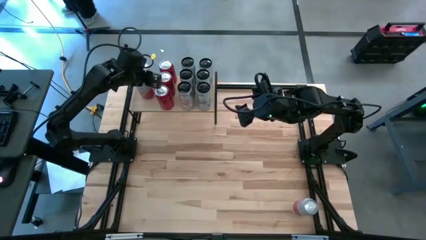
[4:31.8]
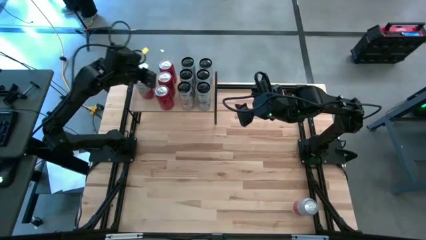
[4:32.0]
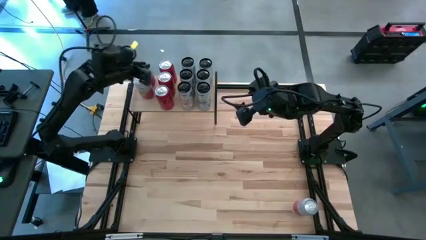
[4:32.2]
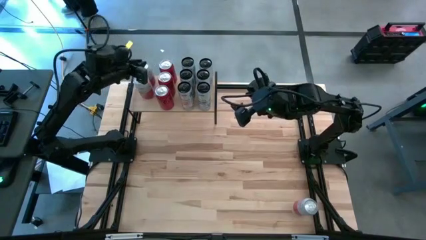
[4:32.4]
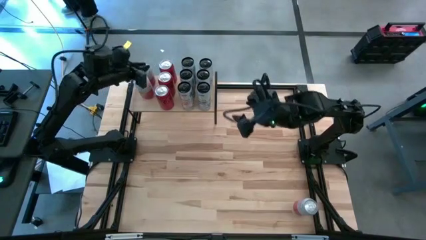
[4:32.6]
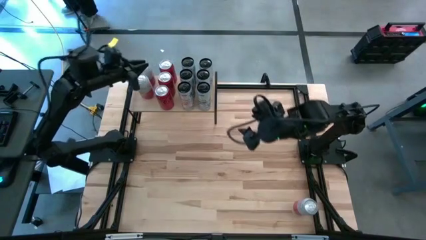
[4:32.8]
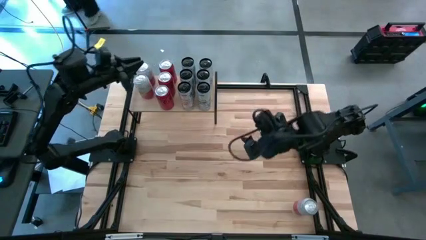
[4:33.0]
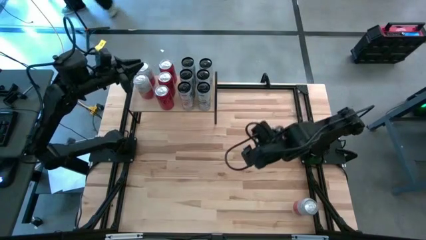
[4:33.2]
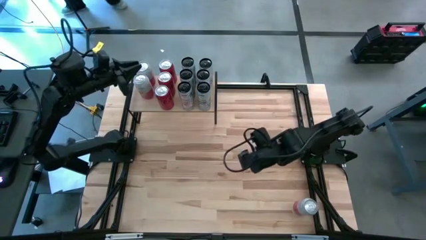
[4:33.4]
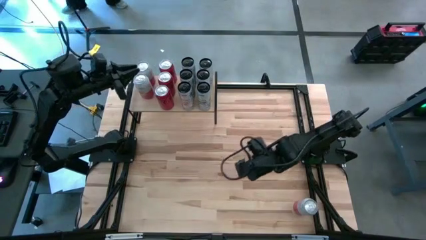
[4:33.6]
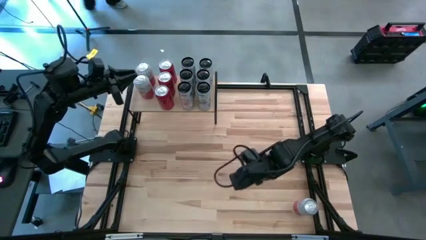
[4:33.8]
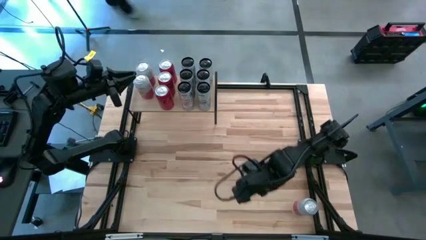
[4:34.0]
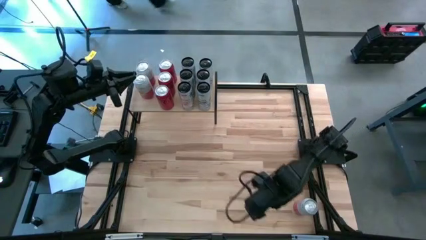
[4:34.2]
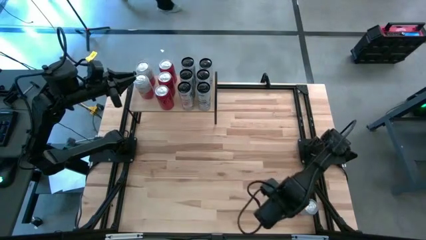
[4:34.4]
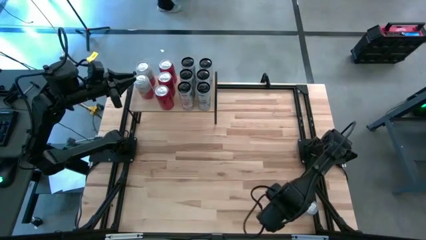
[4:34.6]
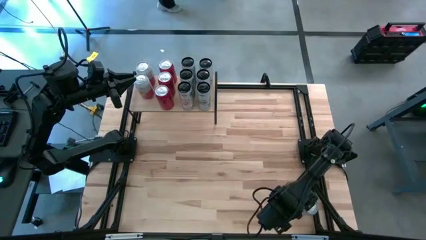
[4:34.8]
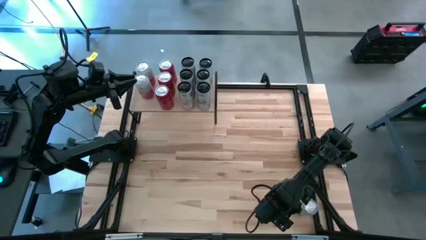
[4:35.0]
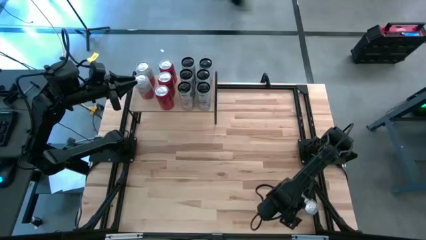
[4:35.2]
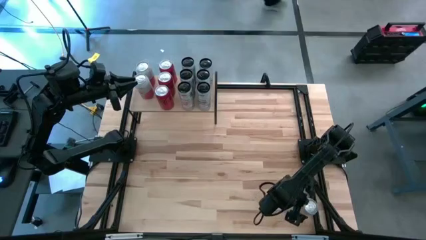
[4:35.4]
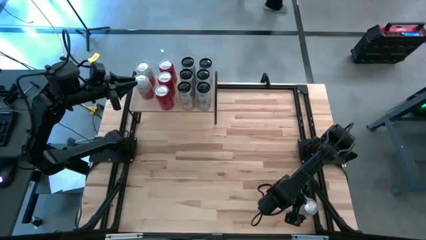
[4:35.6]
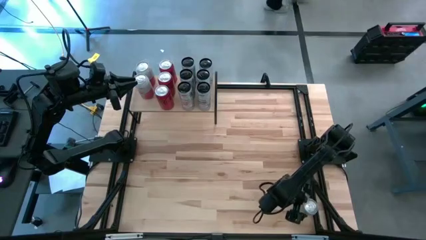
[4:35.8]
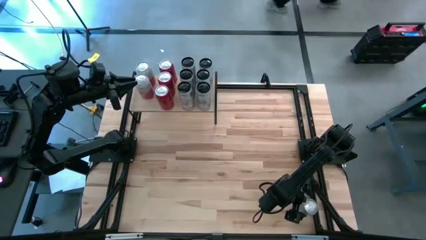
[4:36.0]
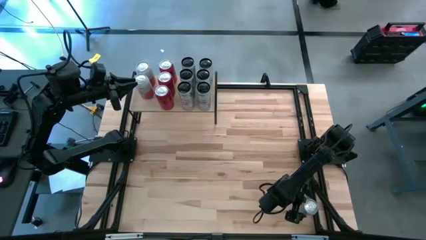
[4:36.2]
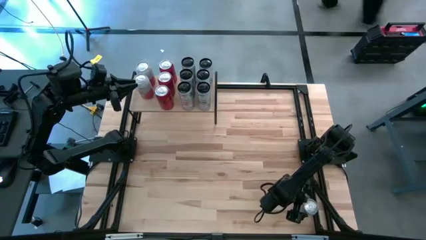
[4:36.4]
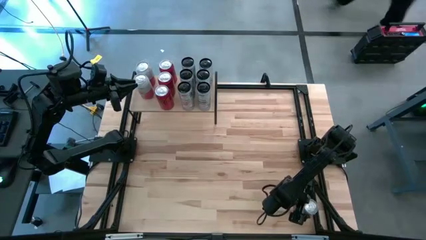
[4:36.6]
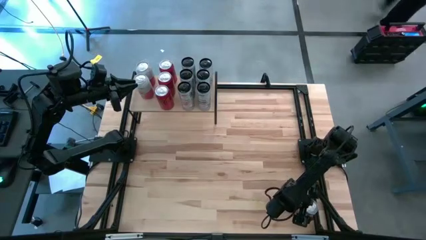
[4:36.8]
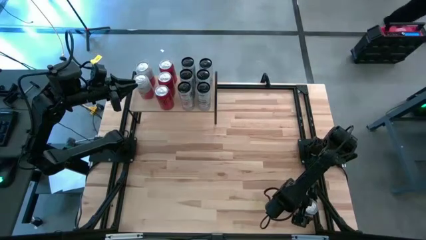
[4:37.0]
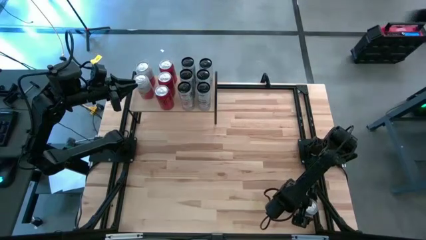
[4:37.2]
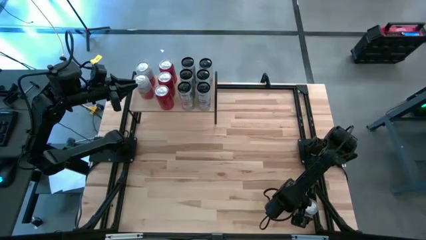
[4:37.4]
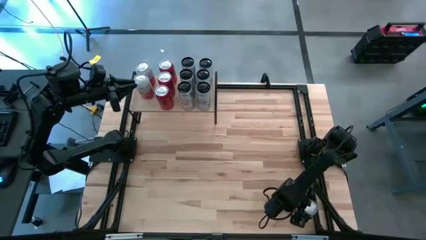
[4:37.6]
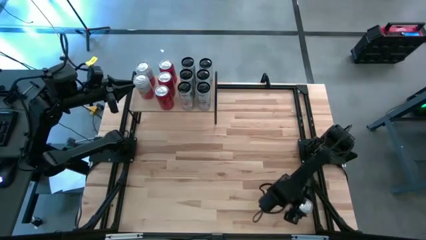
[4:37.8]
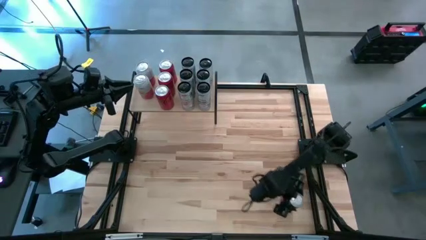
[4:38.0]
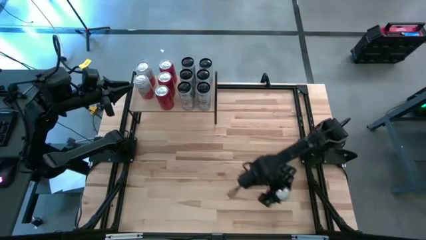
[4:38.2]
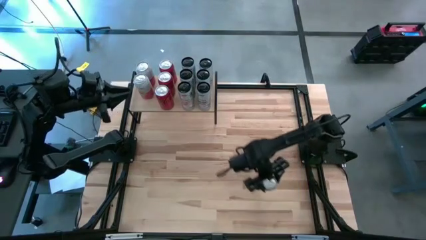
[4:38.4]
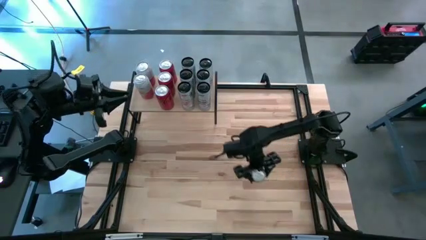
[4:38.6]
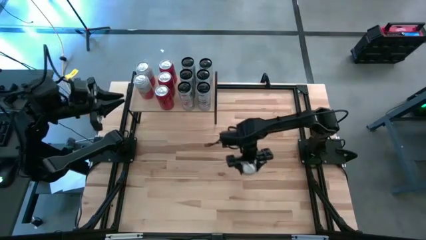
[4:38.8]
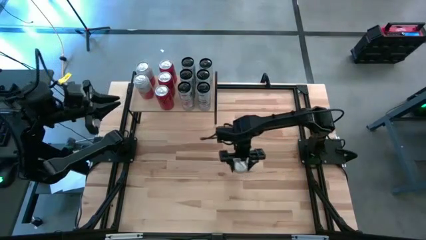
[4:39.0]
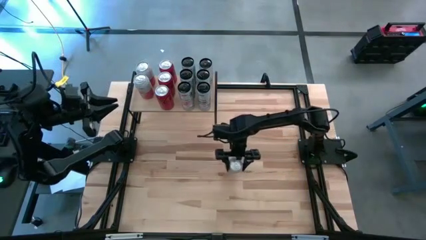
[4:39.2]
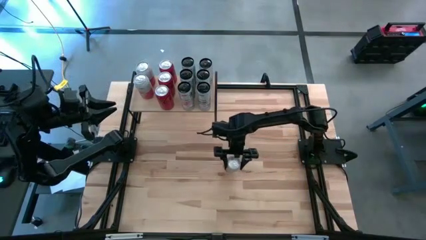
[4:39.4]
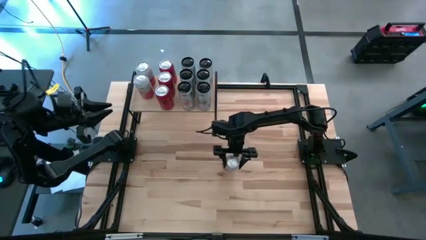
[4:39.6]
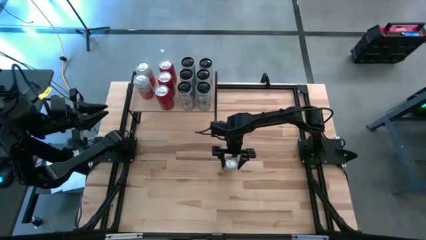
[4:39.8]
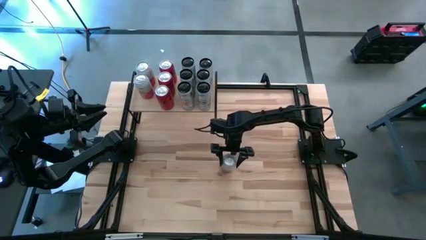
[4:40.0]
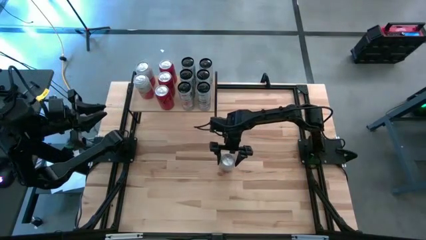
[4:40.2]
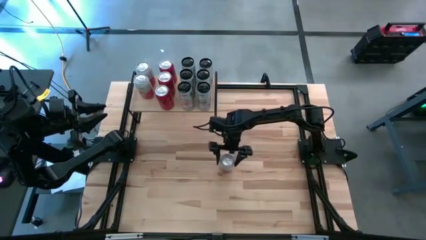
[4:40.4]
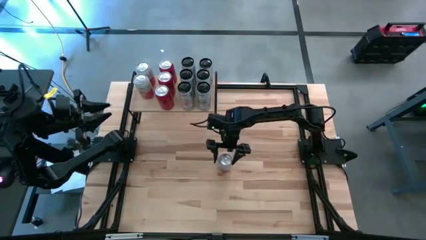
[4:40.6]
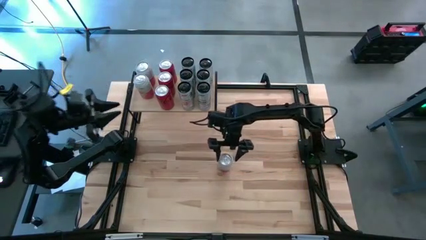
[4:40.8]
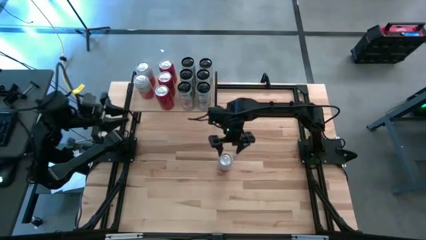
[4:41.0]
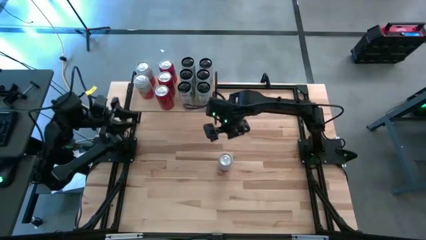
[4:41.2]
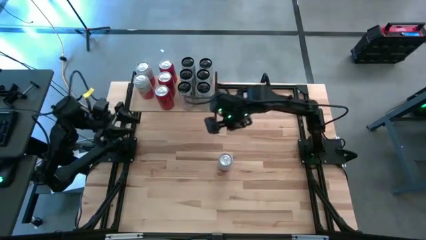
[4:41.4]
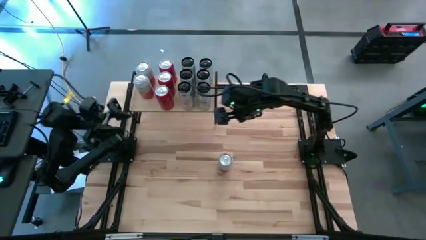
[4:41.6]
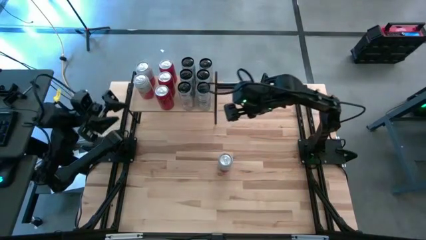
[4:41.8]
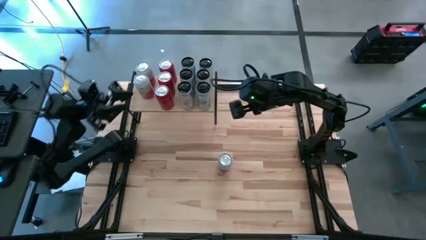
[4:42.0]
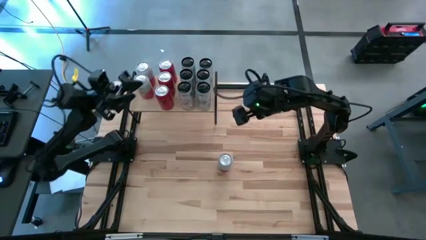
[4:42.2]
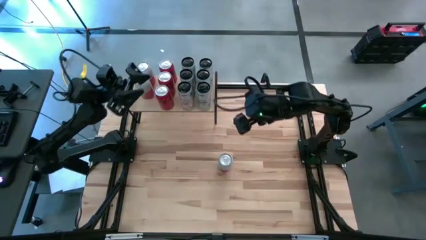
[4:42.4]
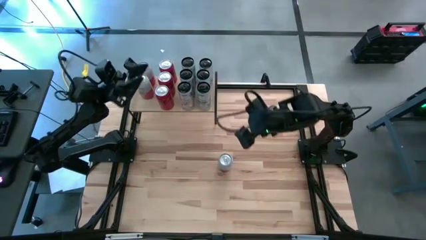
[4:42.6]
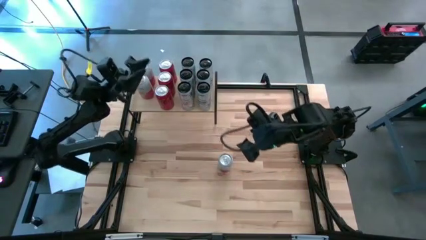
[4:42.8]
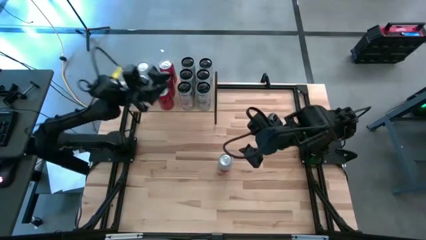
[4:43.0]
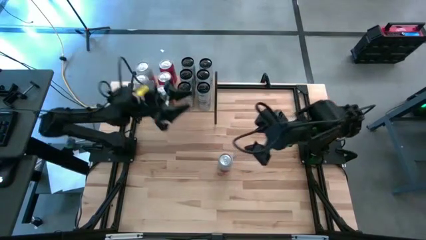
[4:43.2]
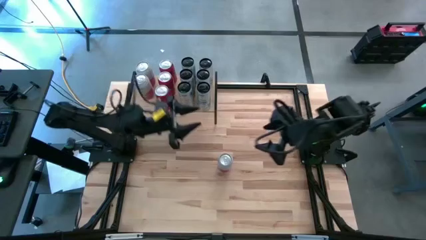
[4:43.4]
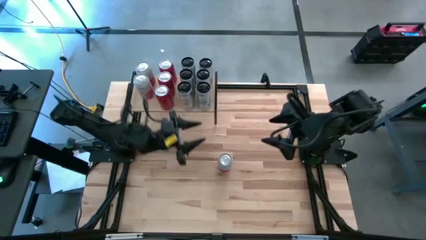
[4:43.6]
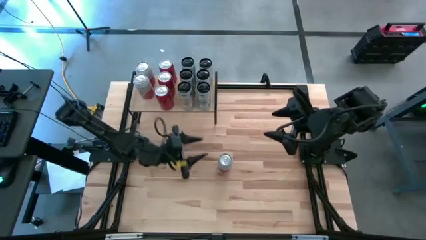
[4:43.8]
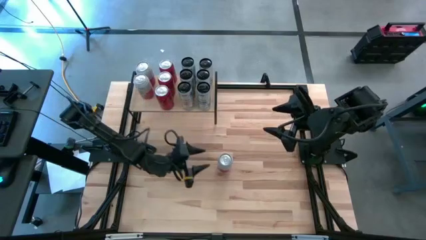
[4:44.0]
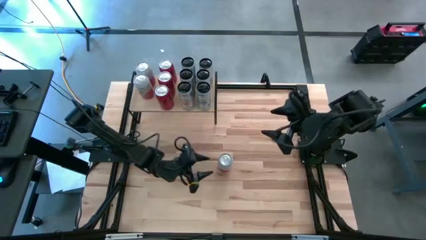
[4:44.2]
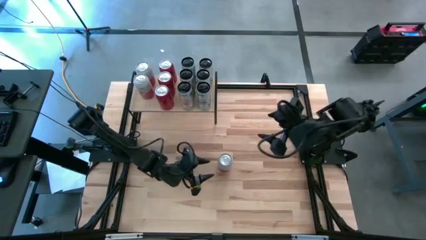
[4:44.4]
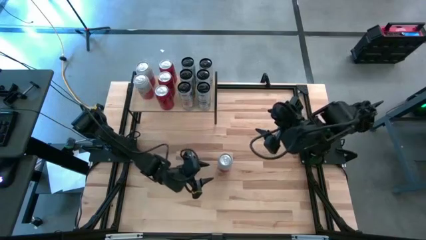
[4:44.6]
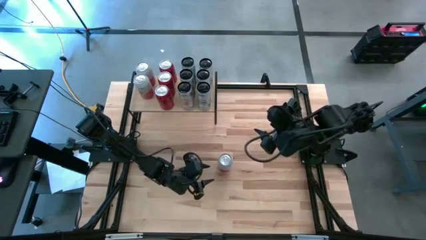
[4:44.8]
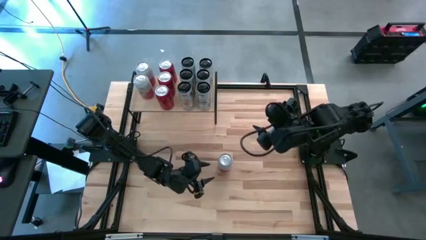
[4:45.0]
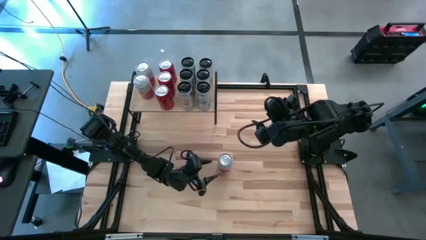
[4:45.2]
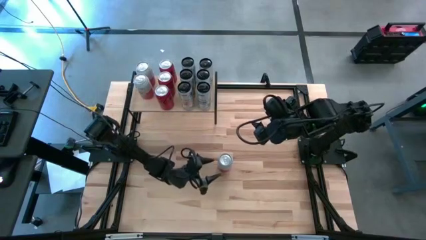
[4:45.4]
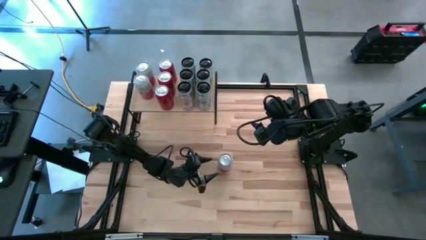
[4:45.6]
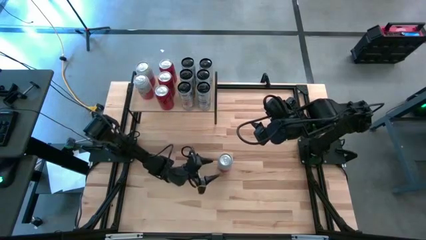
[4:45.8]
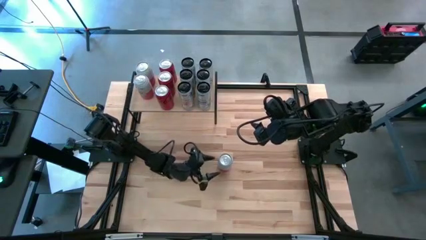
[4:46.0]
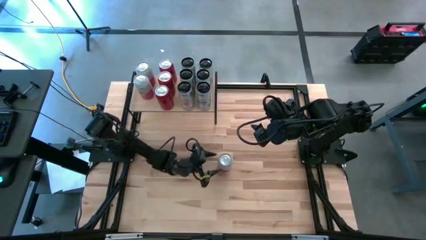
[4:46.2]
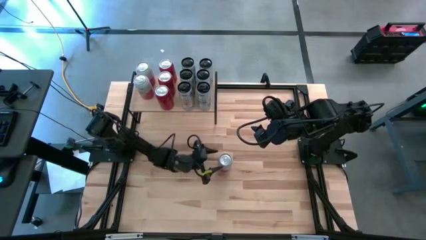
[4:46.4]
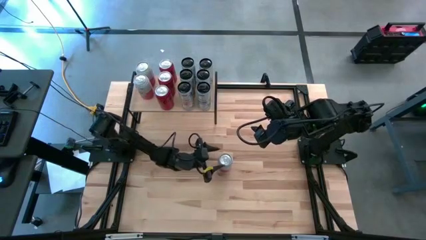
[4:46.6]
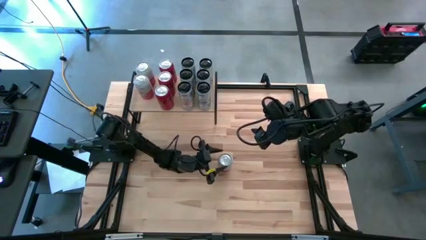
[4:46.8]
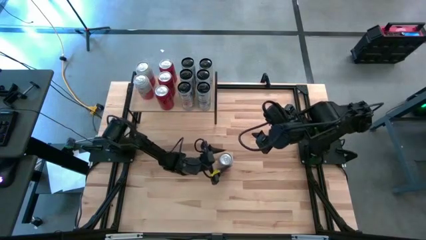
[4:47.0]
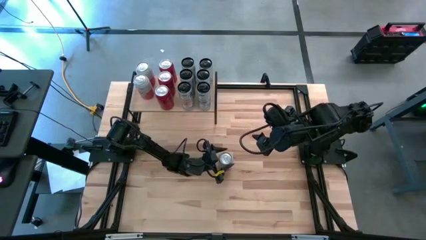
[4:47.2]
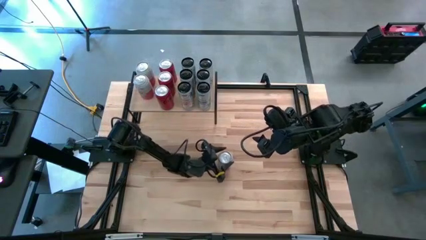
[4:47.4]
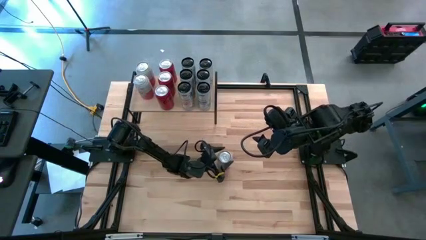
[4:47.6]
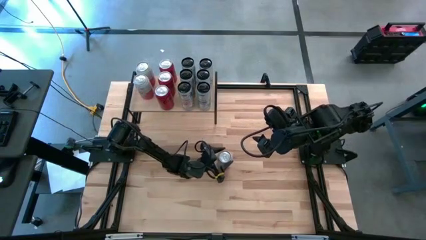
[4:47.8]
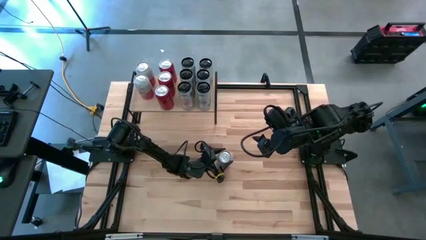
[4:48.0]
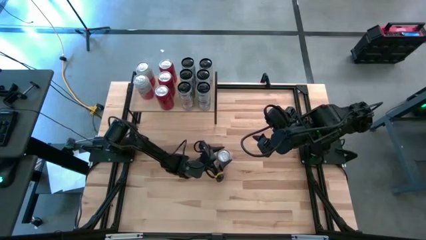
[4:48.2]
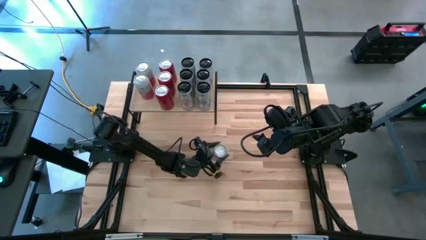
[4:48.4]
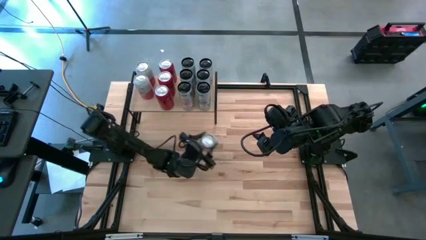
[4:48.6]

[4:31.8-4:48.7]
Task: Place canned beverage on shelf
Put the pink soda can on the shelf aligned with the other pink soda cans
